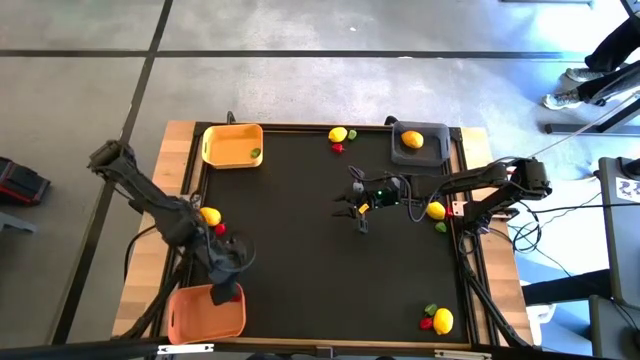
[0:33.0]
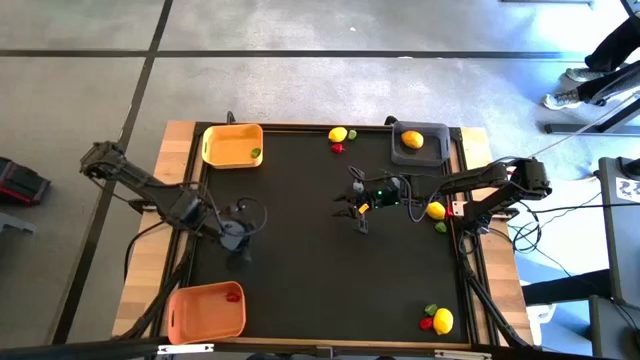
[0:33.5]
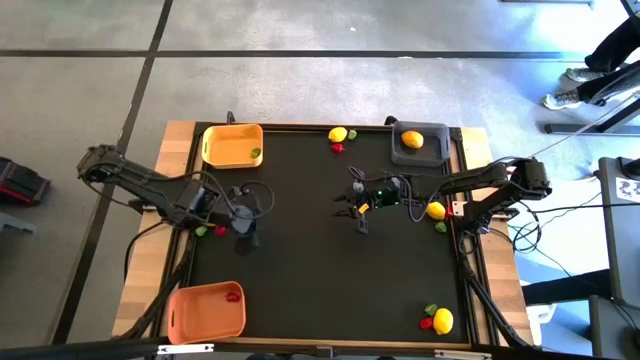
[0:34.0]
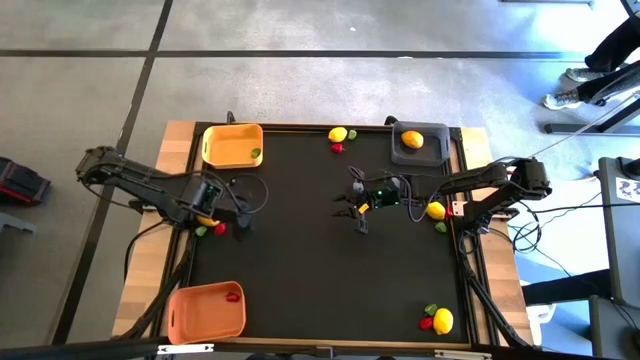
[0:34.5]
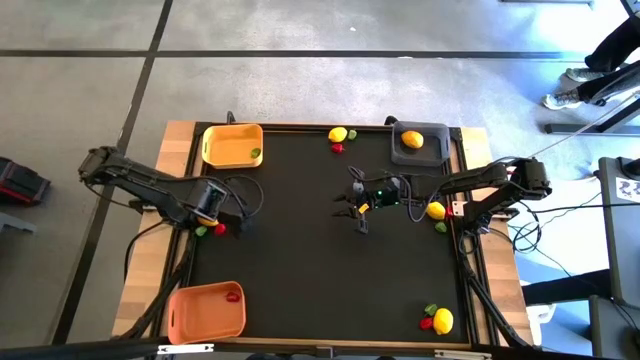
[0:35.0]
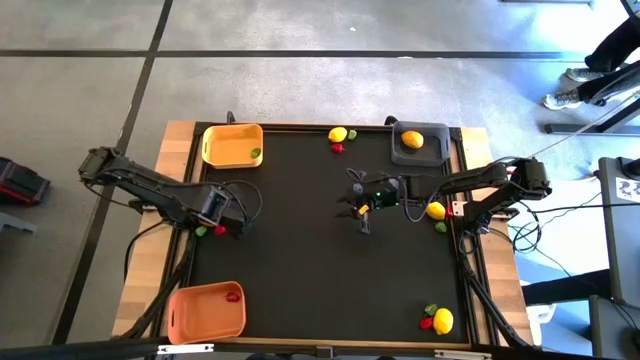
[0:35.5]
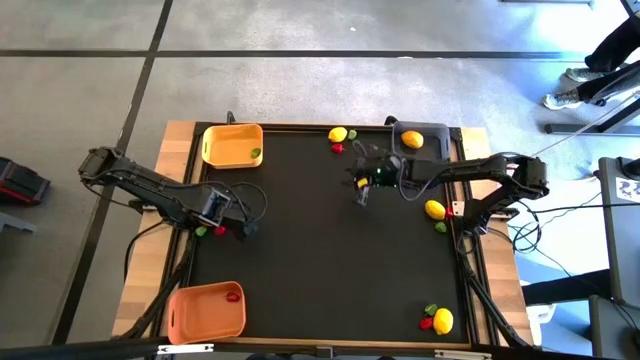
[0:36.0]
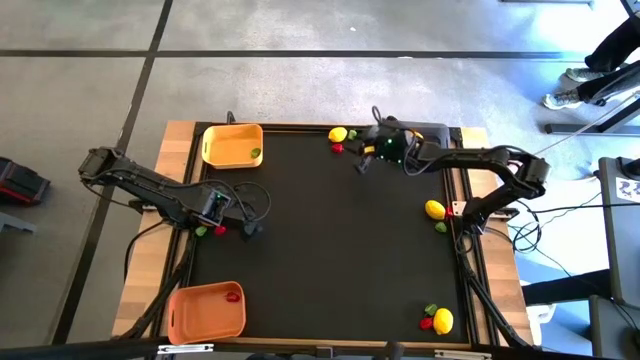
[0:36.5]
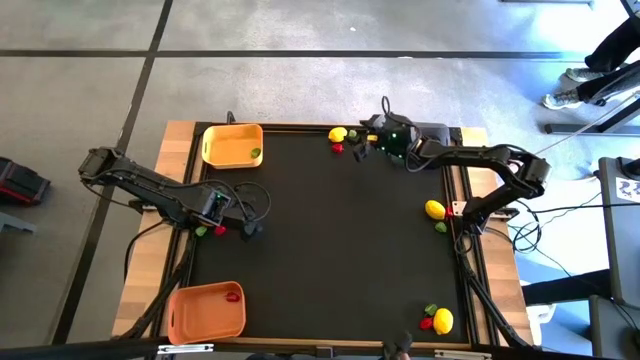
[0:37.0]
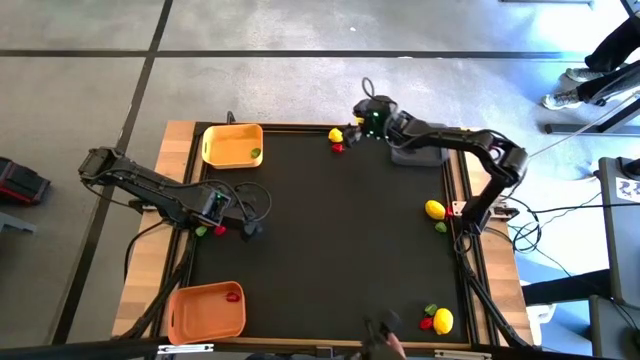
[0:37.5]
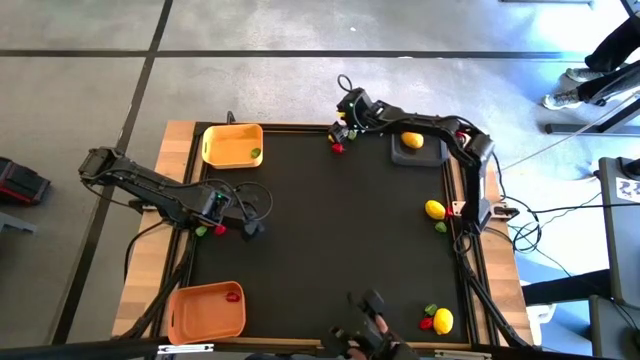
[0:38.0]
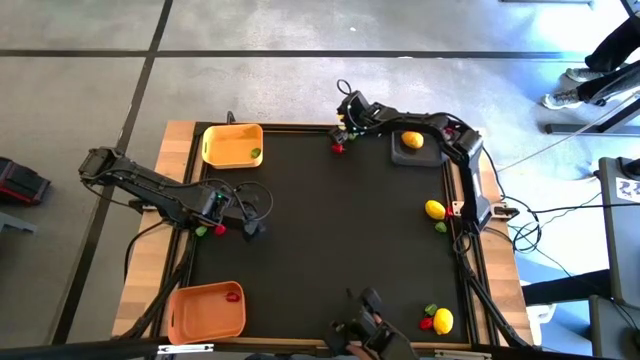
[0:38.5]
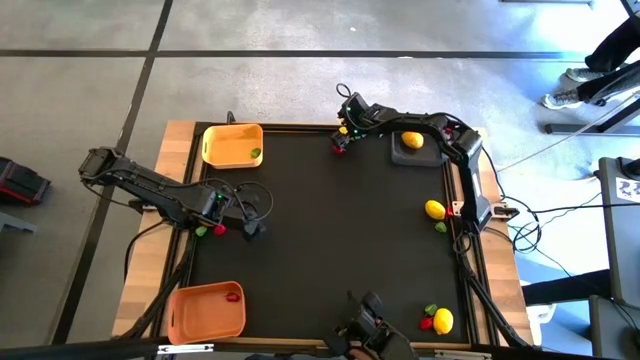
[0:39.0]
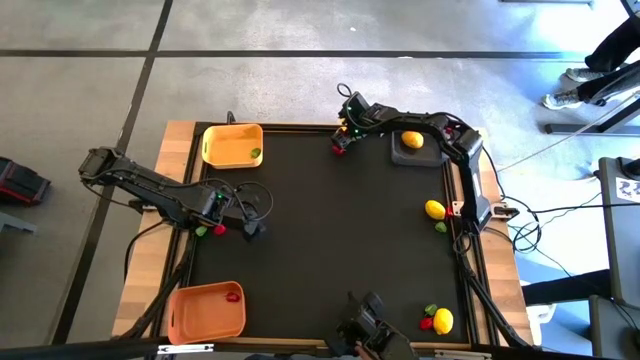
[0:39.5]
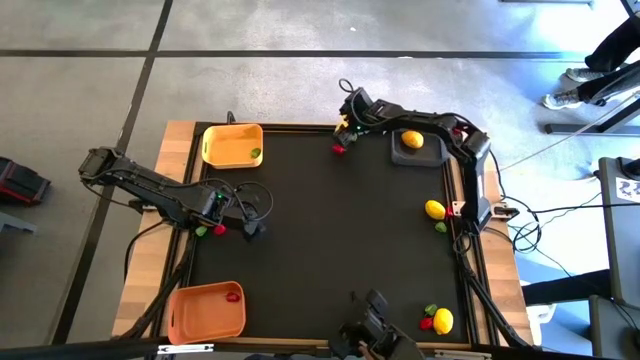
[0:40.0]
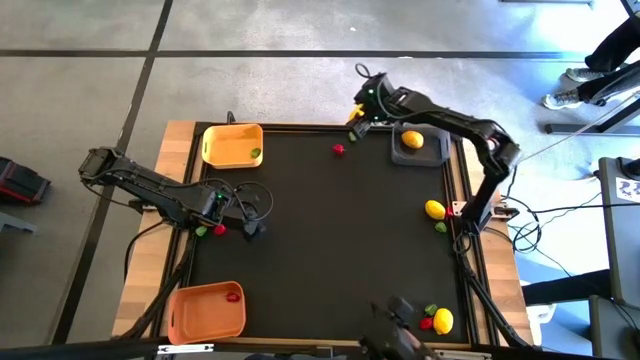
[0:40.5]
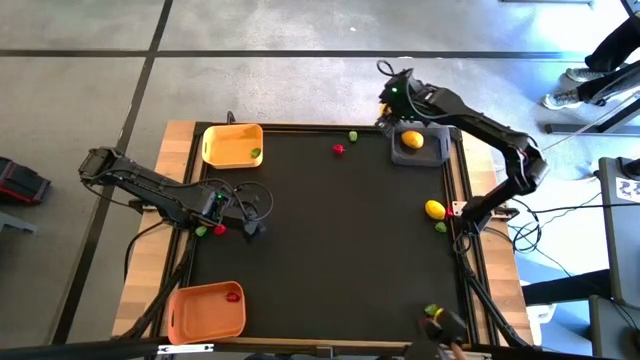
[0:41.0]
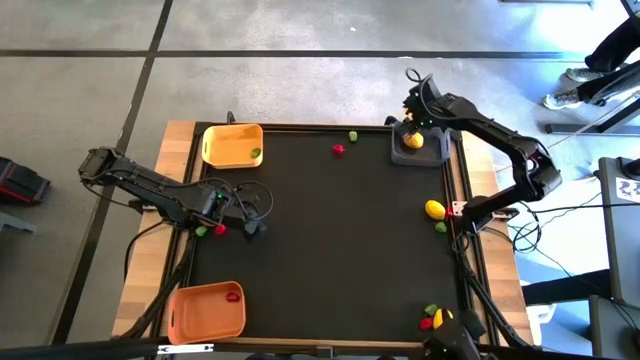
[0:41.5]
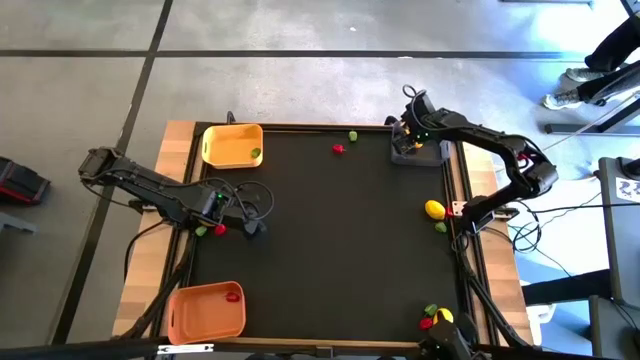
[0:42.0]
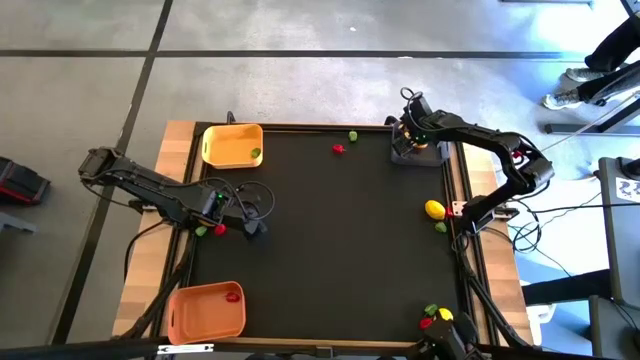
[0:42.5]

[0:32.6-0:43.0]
Task: Sort produce into baskets
Put the yellow lemon into the black bin

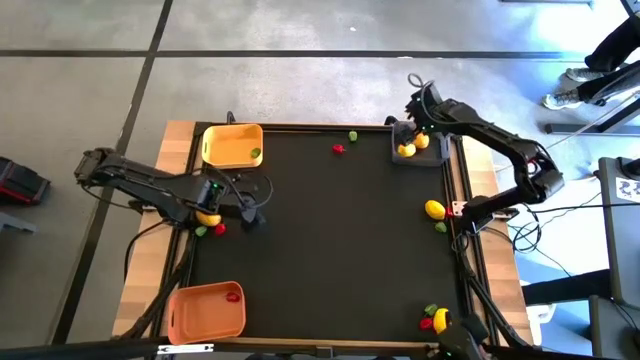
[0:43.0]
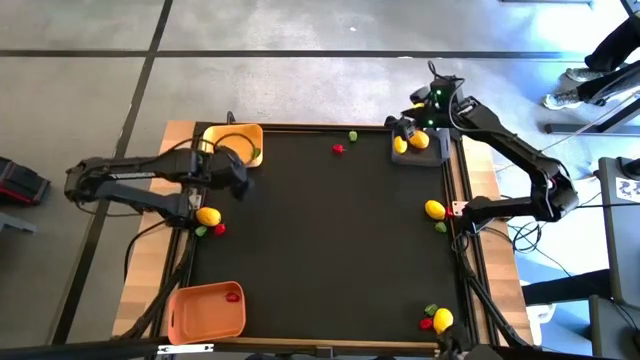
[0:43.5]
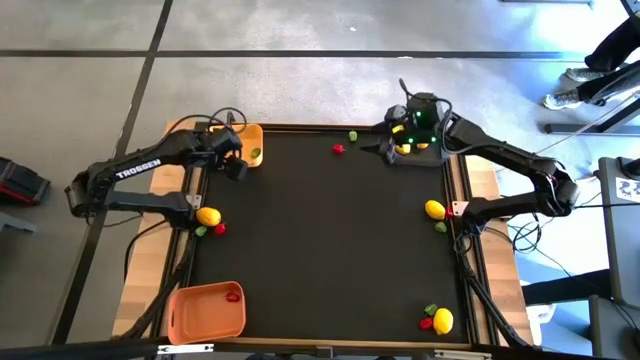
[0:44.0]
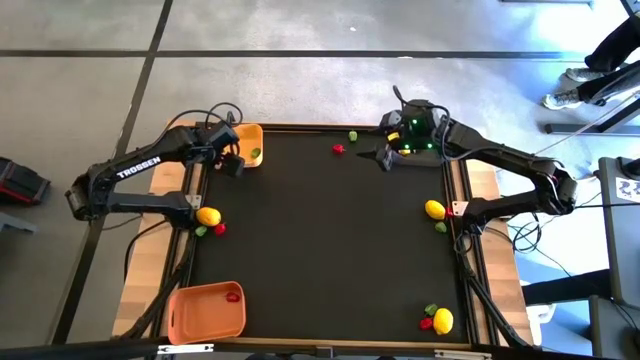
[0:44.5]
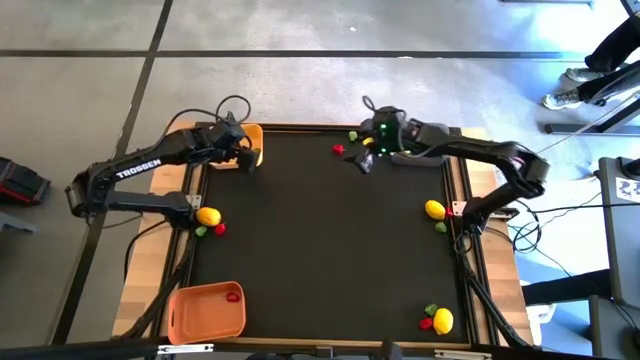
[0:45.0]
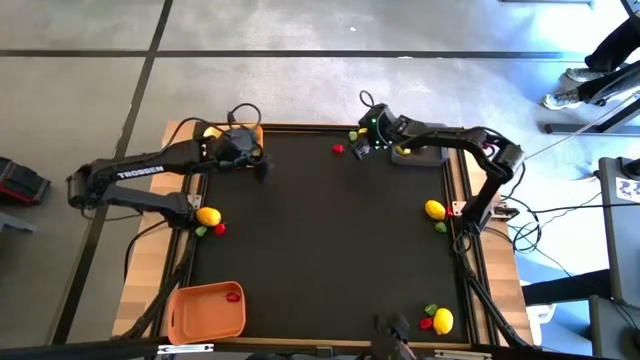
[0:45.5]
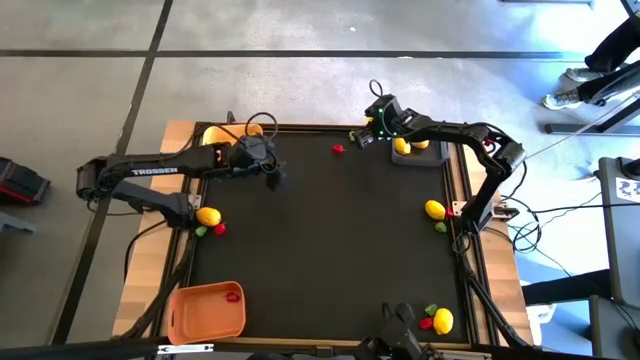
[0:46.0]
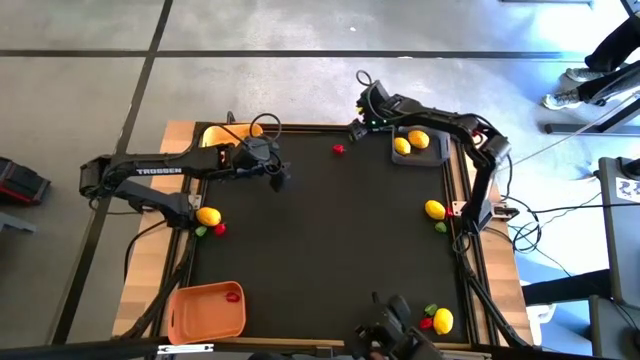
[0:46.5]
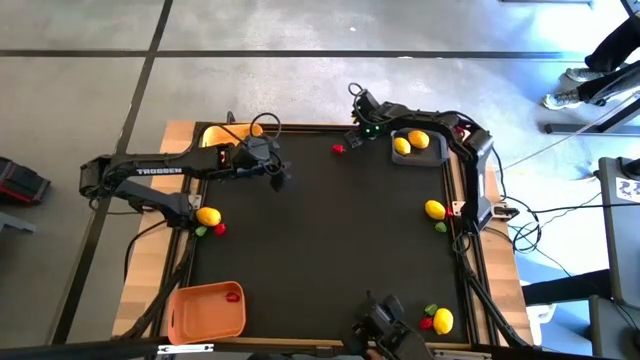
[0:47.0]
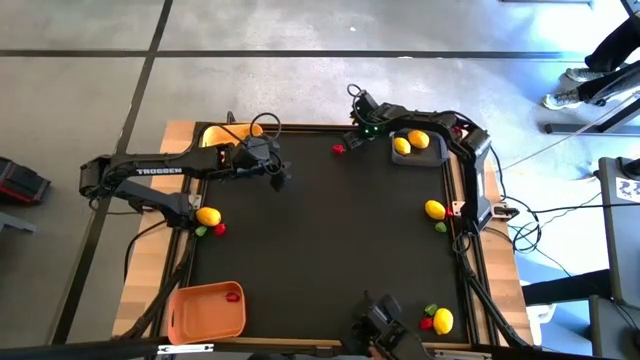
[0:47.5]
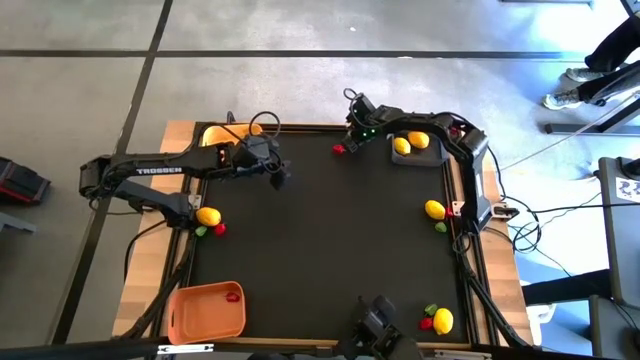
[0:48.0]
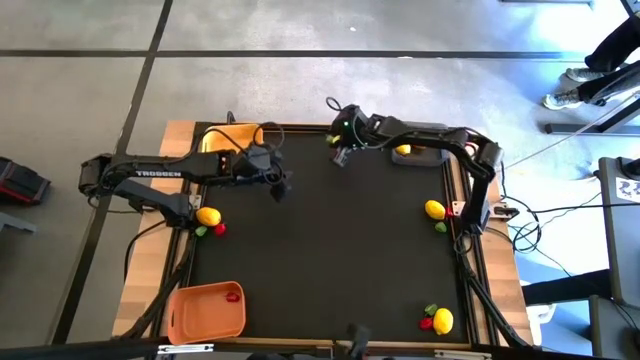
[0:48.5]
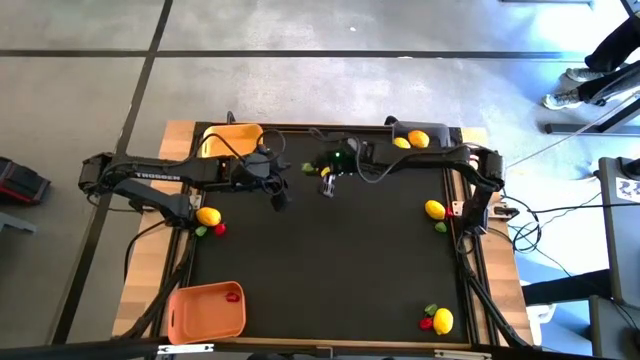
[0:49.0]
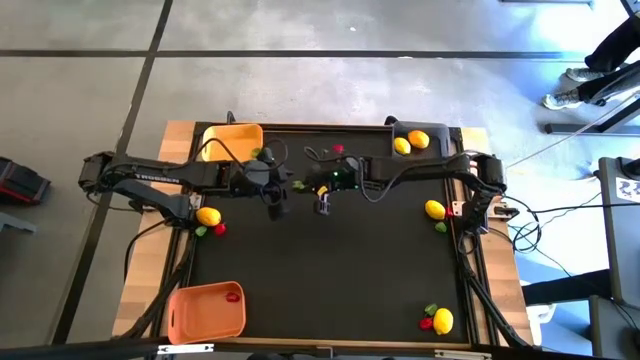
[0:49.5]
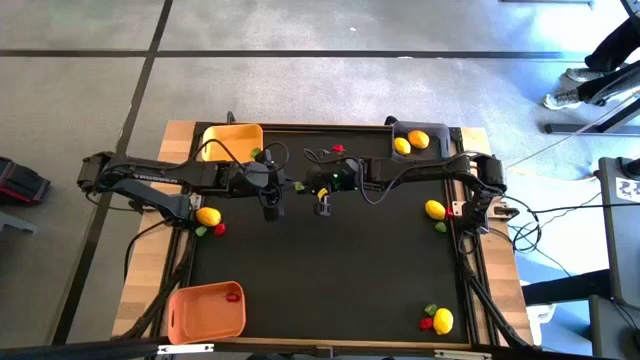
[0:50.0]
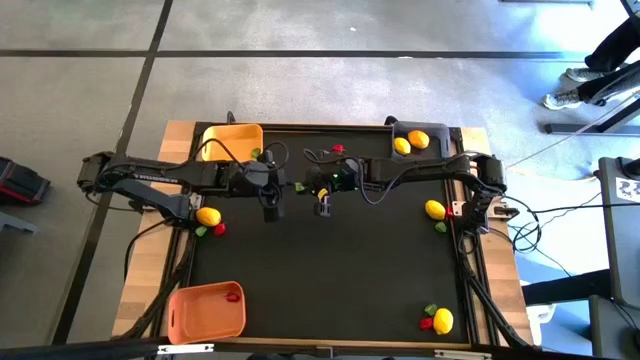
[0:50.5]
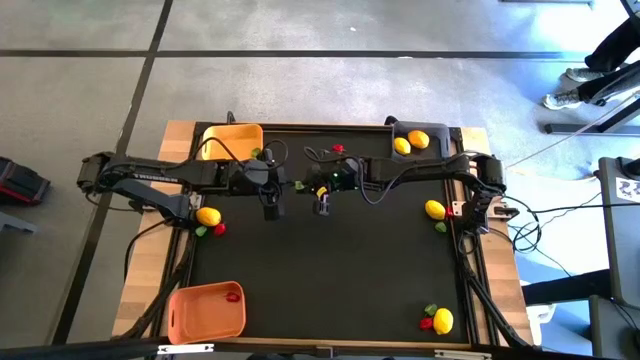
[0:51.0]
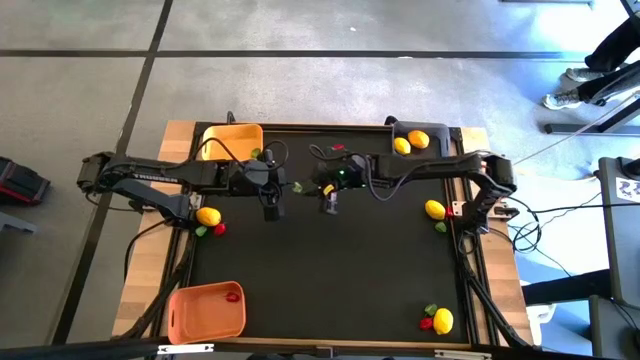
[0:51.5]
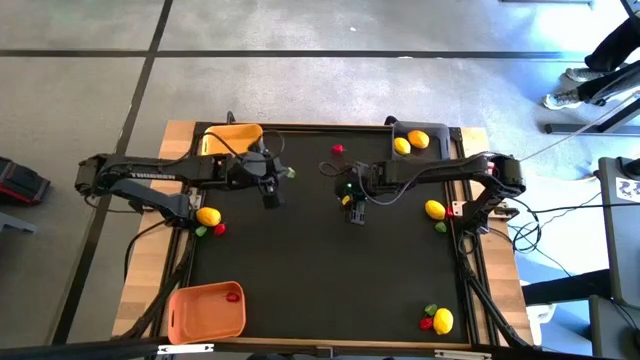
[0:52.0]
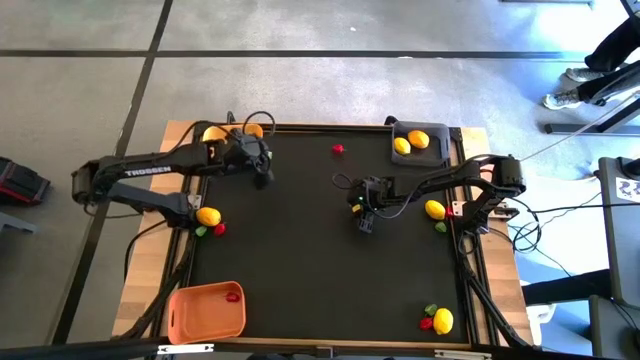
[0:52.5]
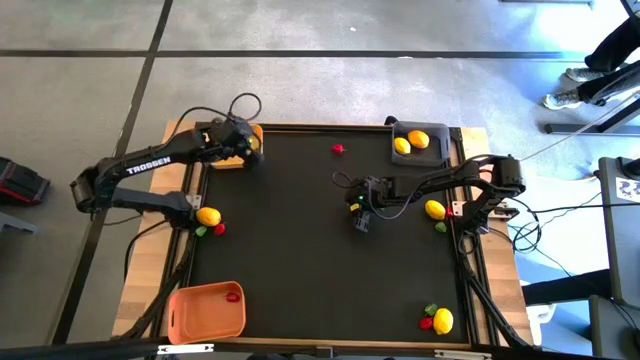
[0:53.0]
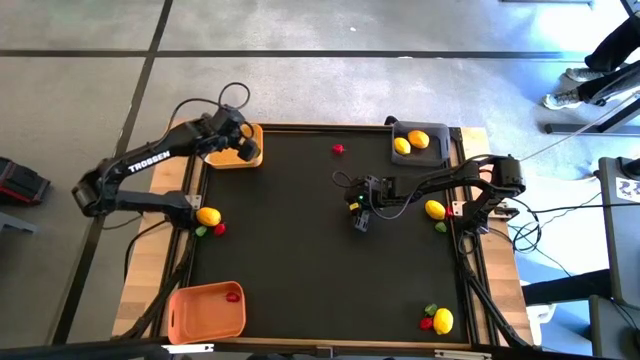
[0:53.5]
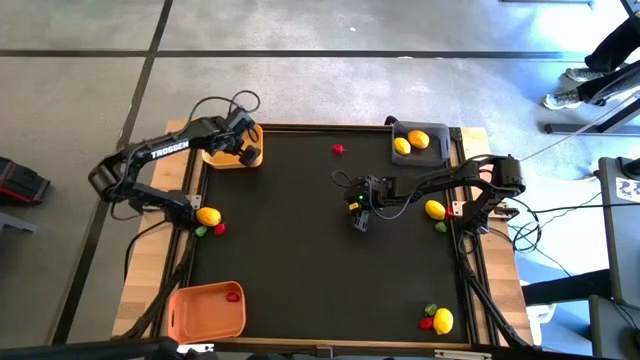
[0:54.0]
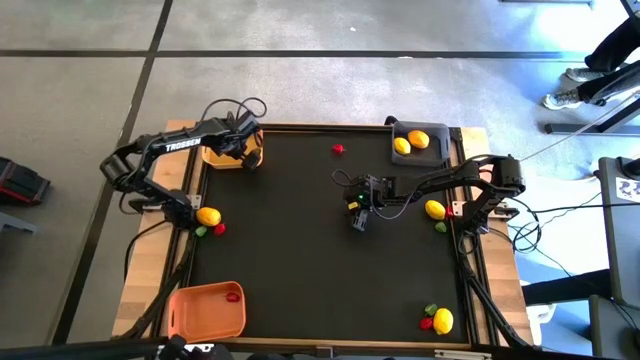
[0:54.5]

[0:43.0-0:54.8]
Put the green bell pepper into the yellow bin
